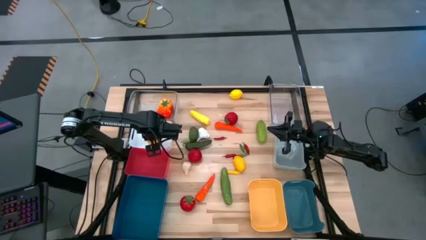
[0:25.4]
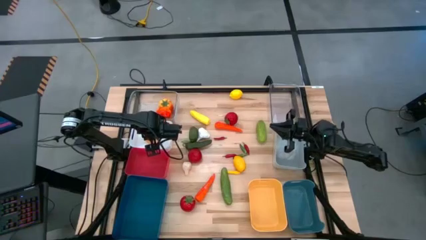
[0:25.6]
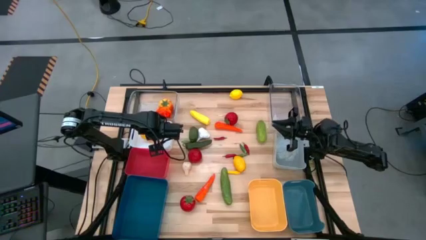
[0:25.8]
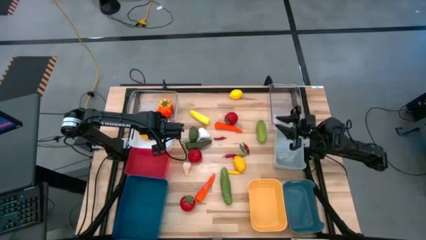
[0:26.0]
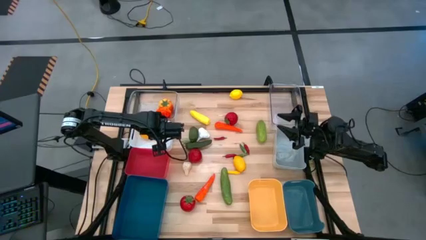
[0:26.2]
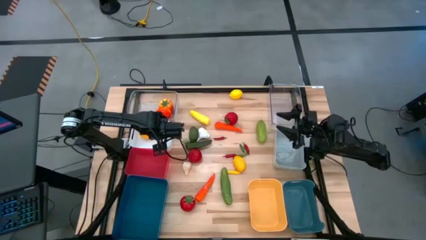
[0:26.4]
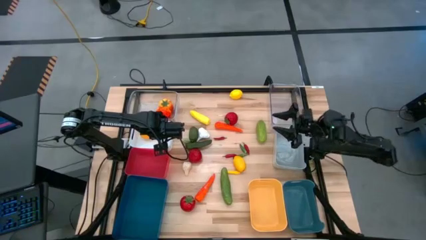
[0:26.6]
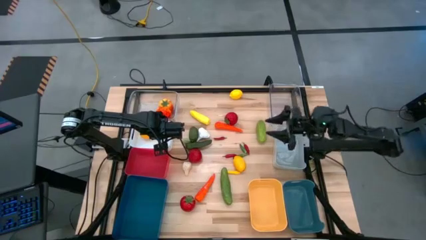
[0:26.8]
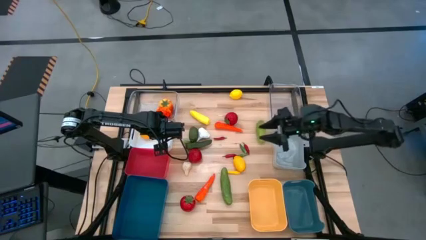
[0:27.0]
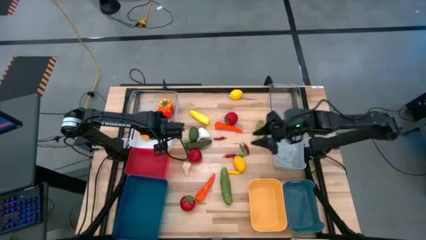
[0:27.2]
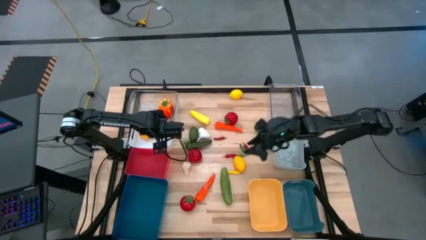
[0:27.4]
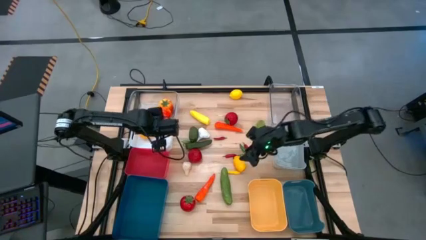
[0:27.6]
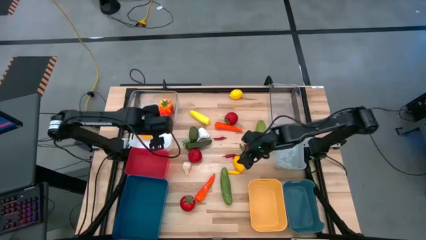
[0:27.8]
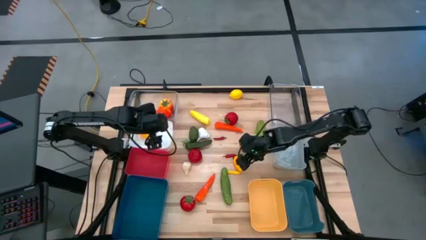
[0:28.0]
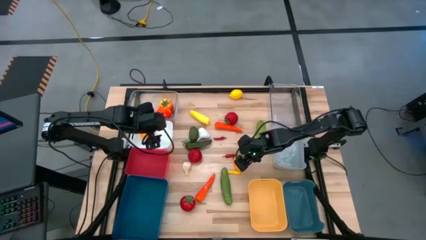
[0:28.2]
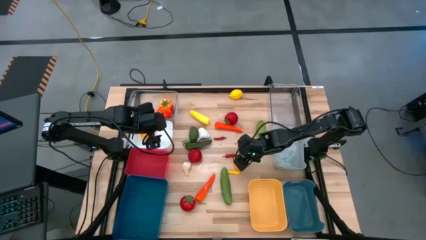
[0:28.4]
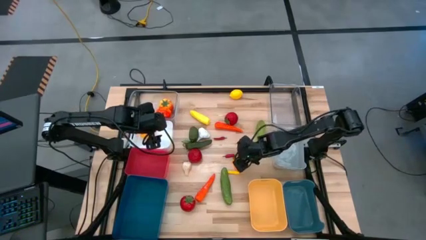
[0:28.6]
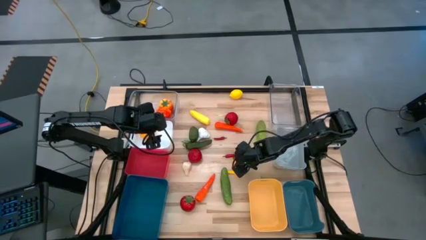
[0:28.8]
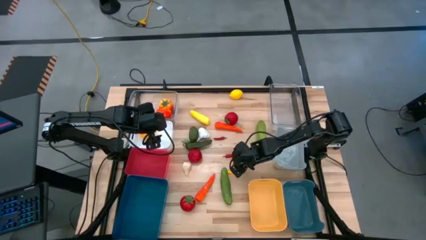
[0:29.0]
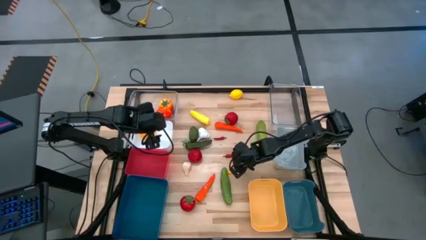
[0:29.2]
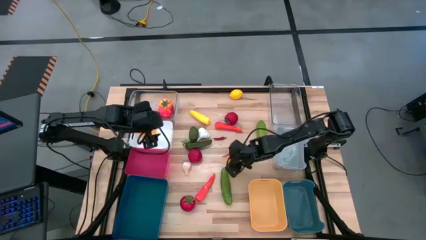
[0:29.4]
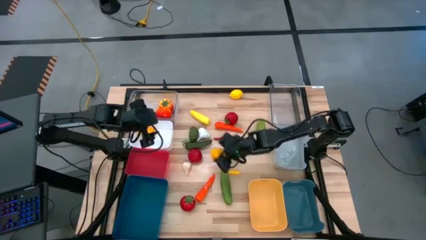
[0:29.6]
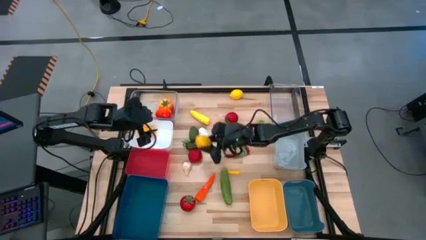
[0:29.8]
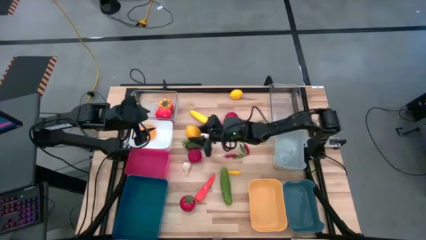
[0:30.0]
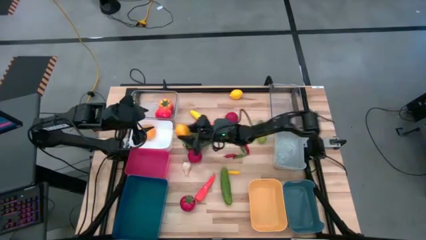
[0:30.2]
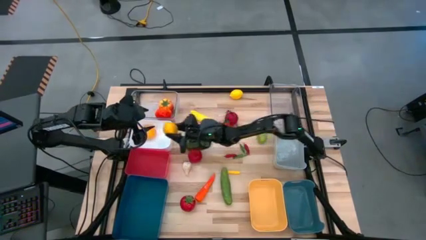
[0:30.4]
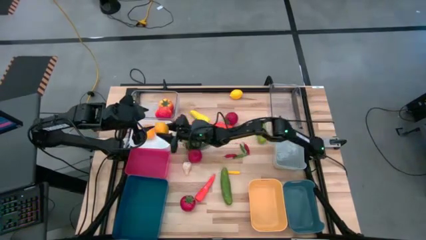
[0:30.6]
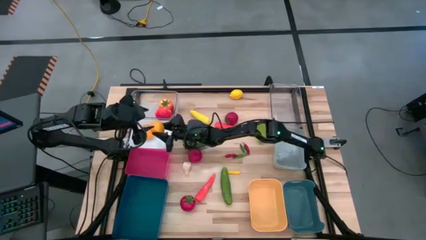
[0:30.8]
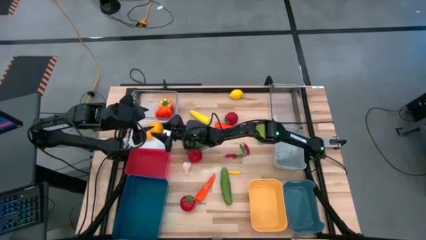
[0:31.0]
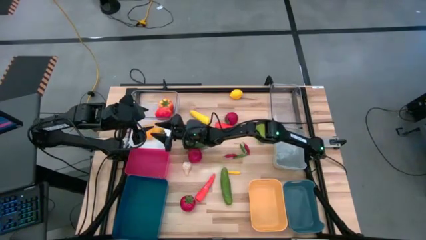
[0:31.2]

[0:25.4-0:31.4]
Task: Sort produce into baskets
Put the bottom yellow lemon into the white bin

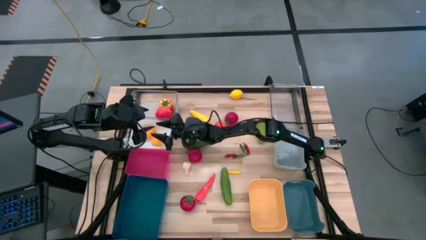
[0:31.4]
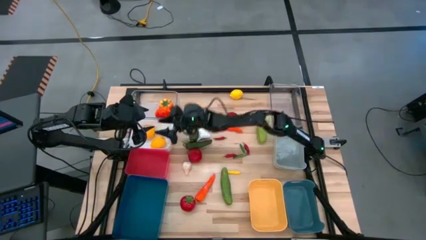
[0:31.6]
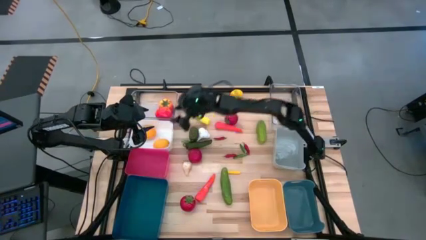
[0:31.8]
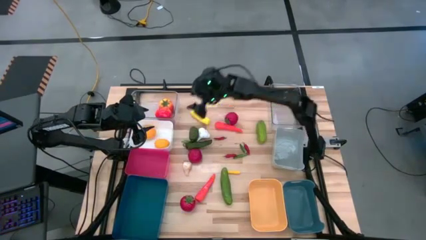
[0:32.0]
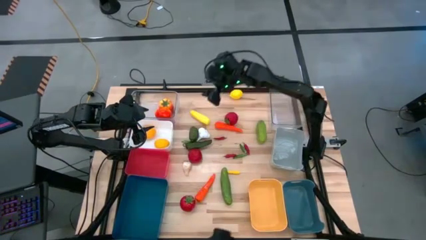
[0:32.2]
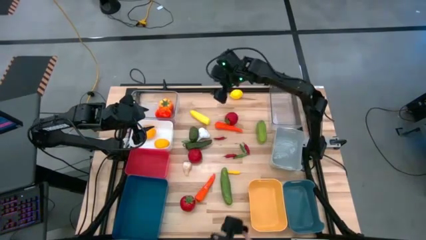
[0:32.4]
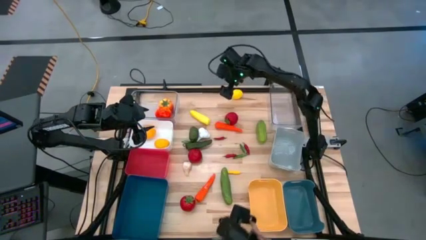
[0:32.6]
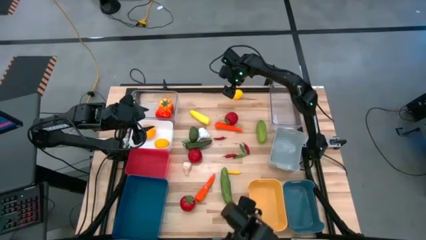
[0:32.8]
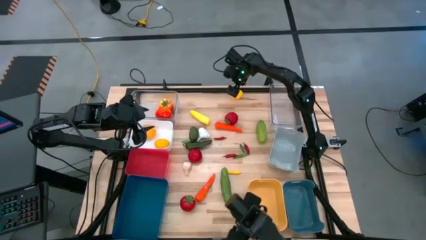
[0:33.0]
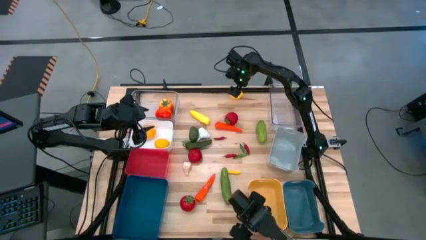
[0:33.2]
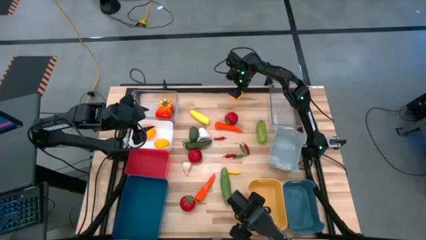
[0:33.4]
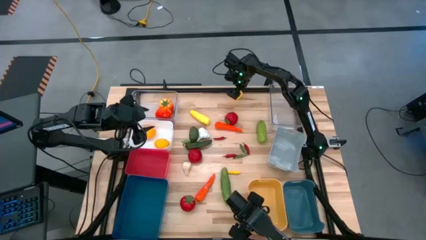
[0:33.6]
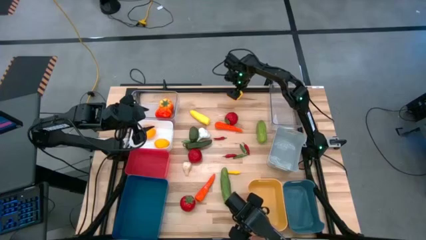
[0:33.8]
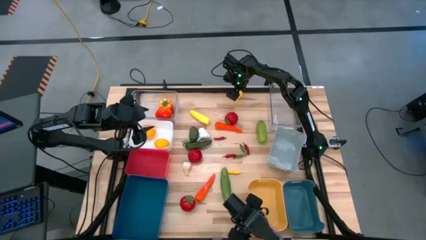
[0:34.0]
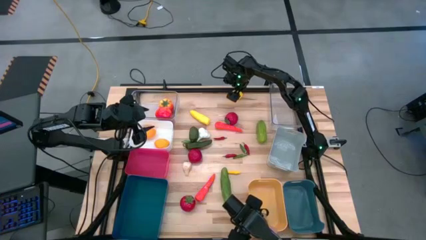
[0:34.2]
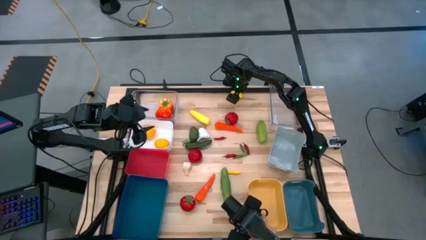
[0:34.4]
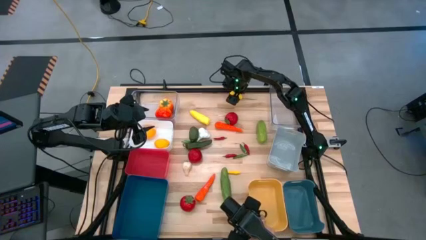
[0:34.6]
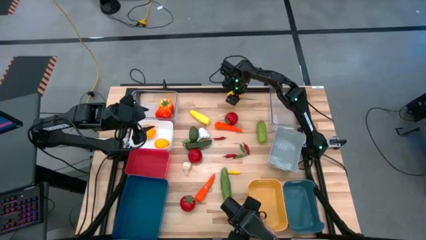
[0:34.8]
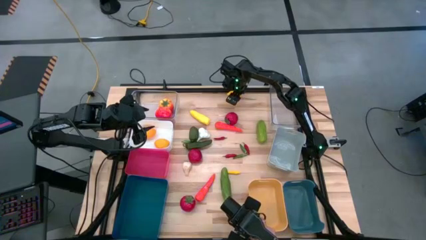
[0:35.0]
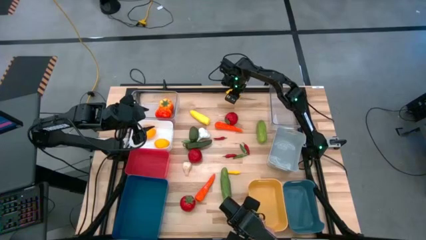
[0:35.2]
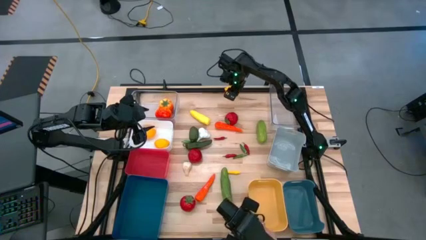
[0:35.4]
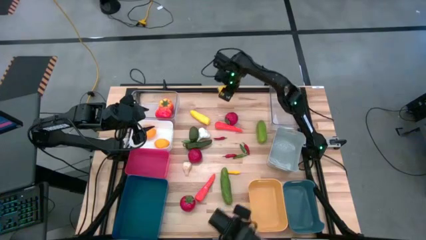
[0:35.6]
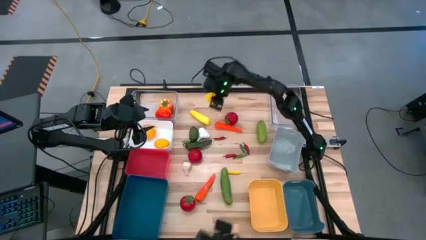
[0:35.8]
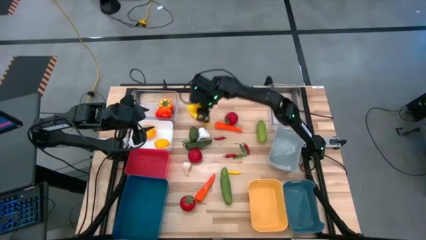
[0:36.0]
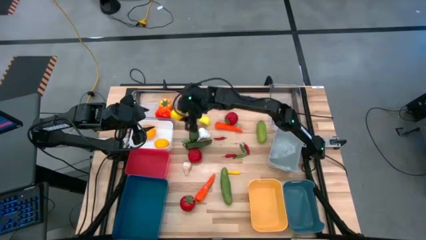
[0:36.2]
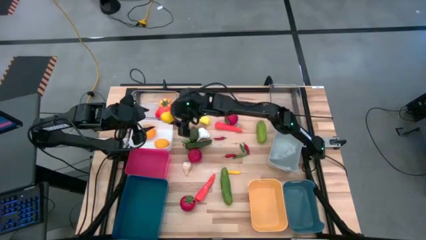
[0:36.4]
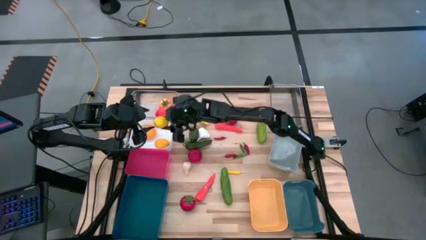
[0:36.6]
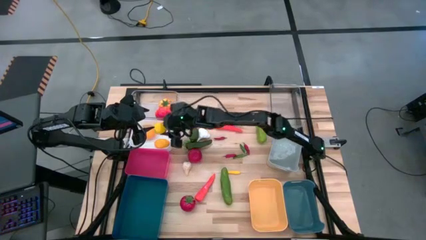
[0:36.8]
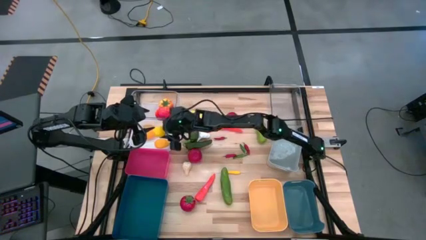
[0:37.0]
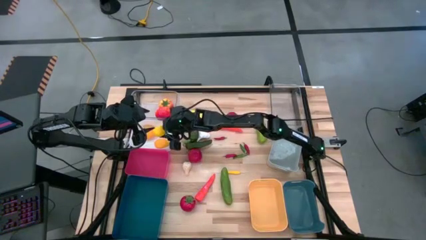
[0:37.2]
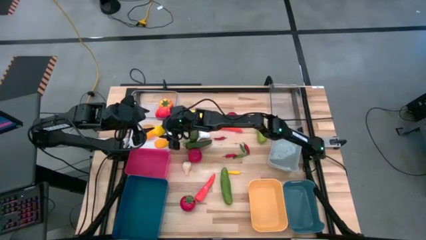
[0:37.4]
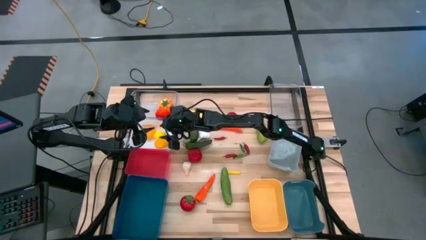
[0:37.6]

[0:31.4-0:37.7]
Put the yellow lemon into the white bin

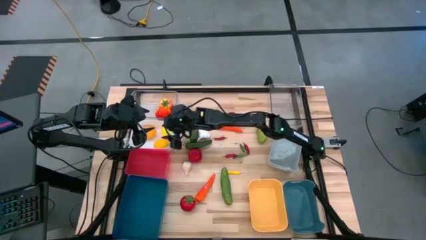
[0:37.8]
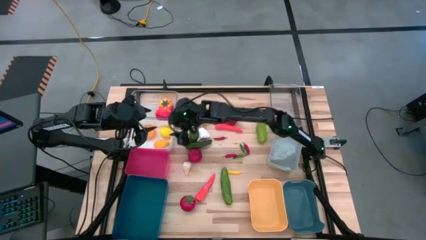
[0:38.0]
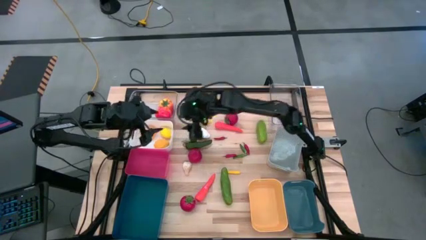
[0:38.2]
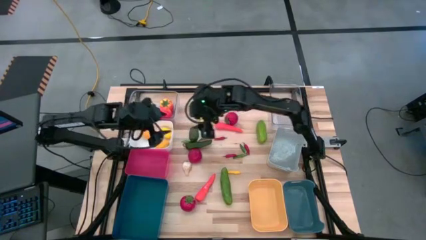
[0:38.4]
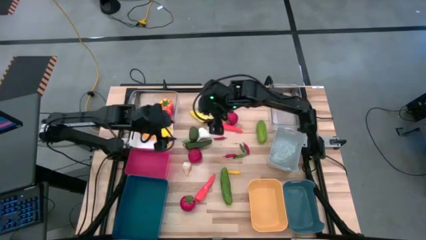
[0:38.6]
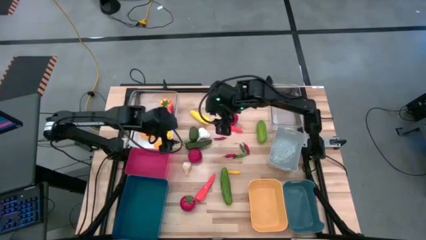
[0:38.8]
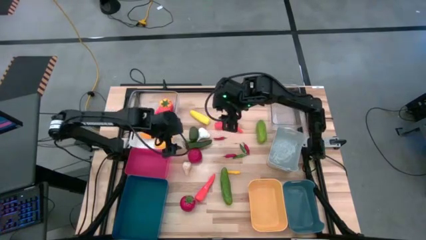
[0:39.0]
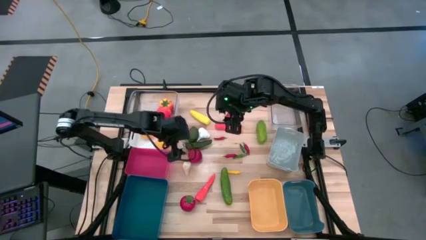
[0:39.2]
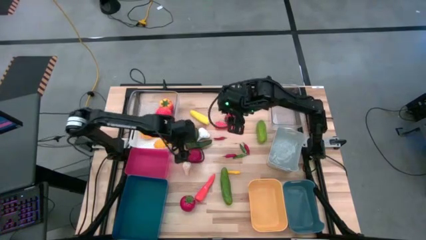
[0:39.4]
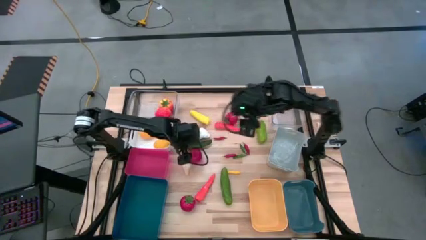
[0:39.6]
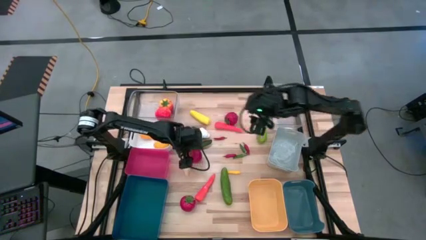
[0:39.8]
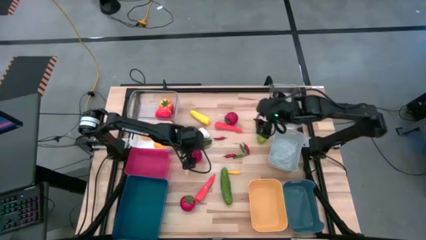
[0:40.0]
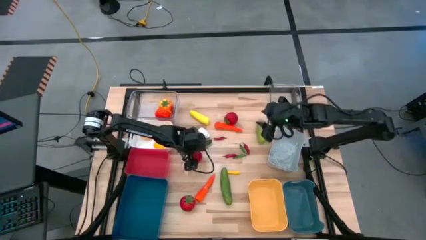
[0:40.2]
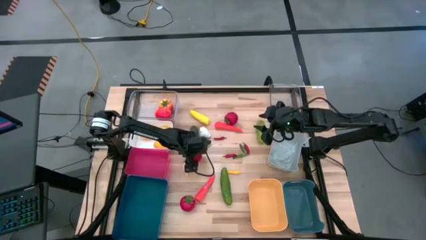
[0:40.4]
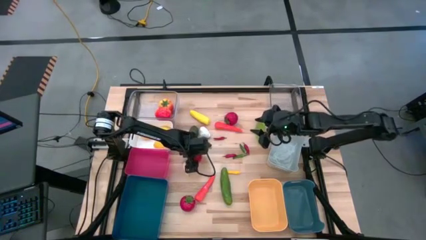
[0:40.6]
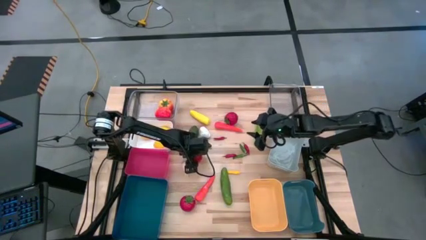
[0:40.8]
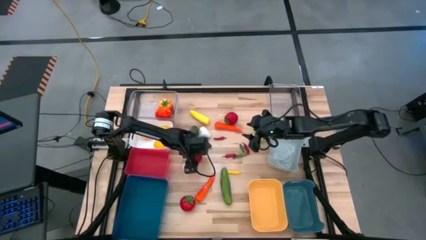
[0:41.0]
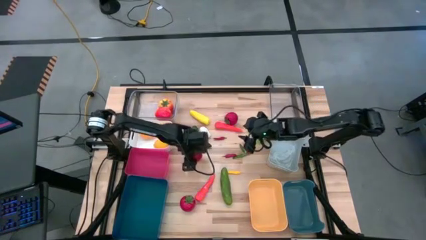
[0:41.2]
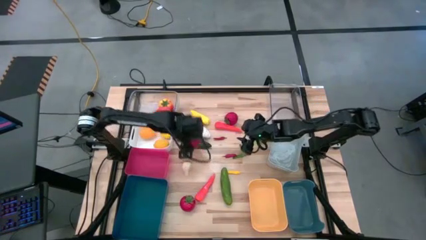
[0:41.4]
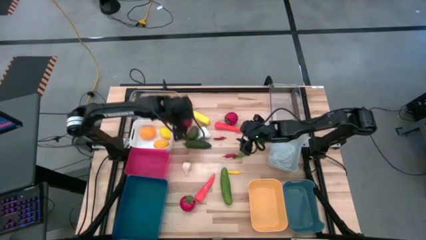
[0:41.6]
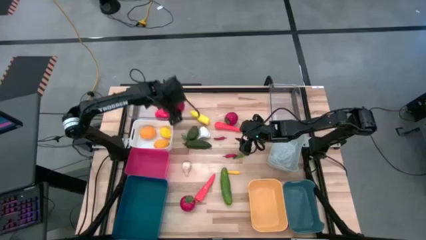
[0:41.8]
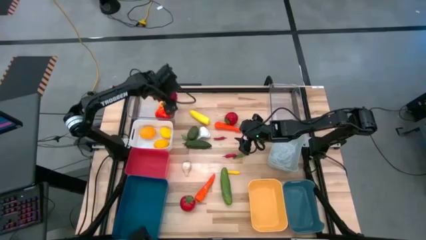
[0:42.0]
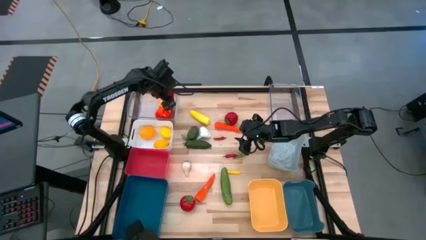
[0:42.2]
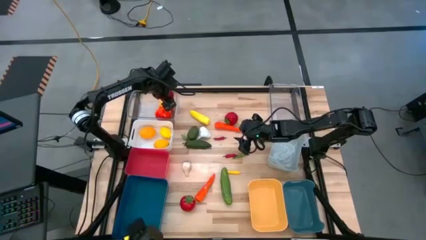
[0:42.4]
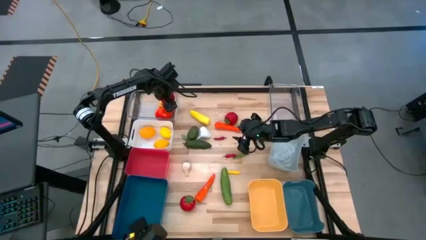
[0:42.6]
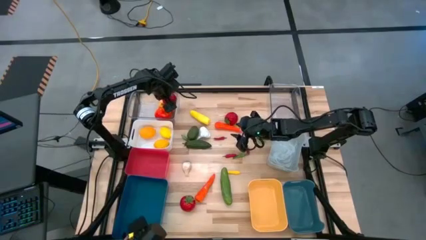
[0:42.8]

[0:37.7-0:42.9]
Put the center red tomato into the left transparent bin
